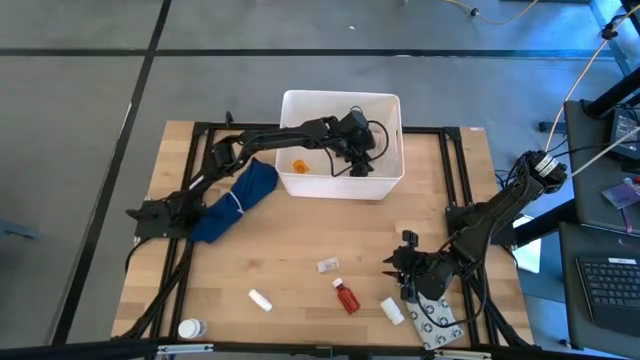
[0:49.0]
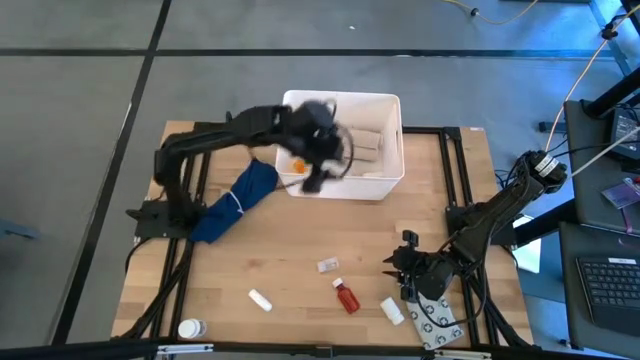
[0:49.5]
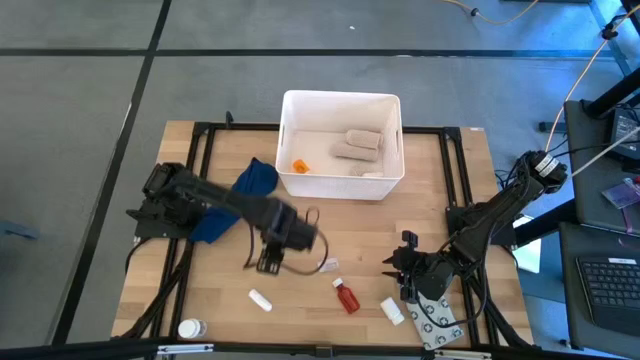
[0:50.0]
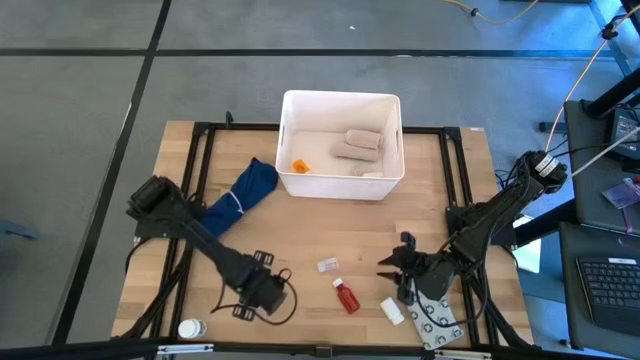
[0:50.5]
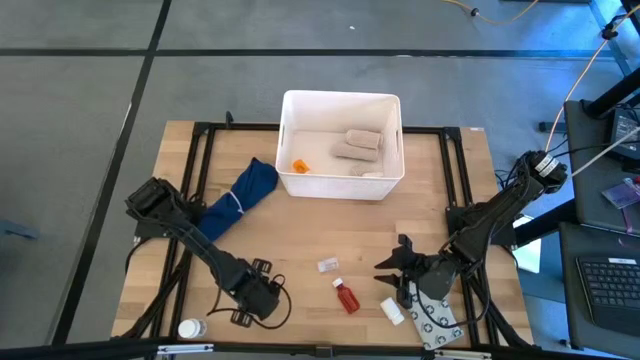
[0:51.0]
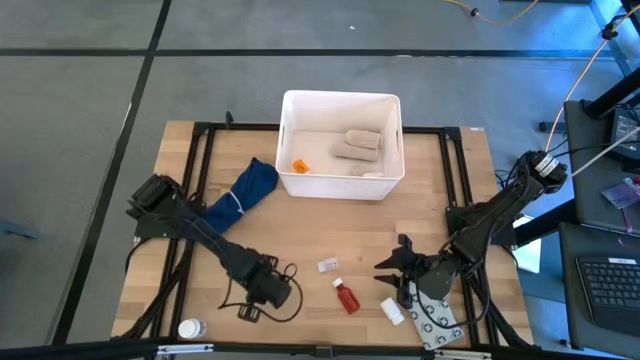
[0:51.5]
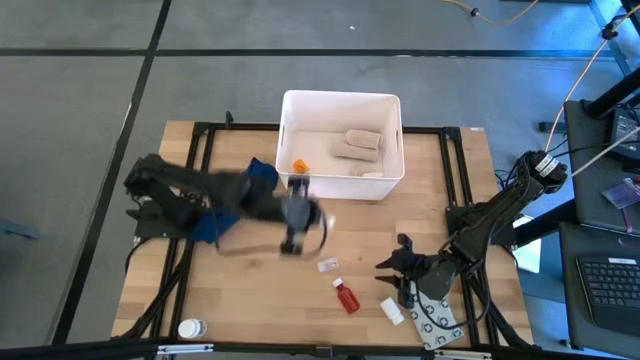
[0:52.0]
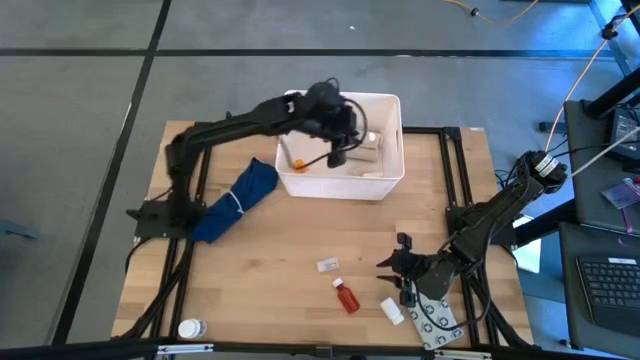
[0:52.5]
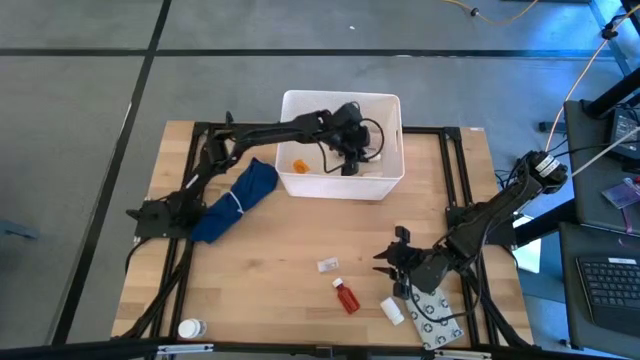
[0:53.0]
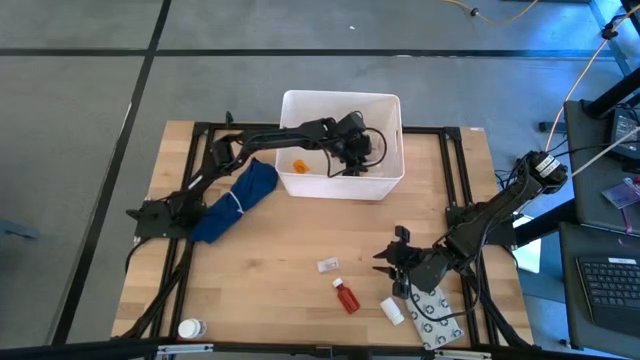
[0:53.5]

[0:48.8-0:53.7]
Task: Pick & place medical supplies in basket/bin
Put the white rolled gauze into the white bin

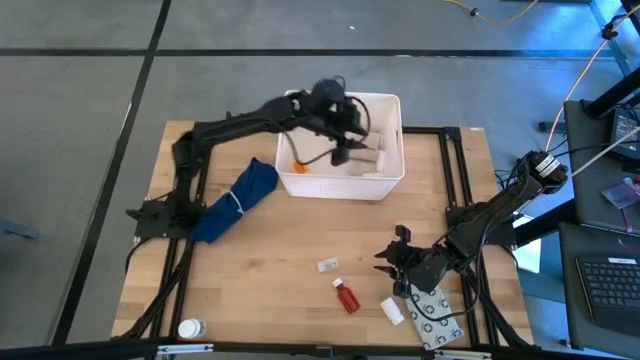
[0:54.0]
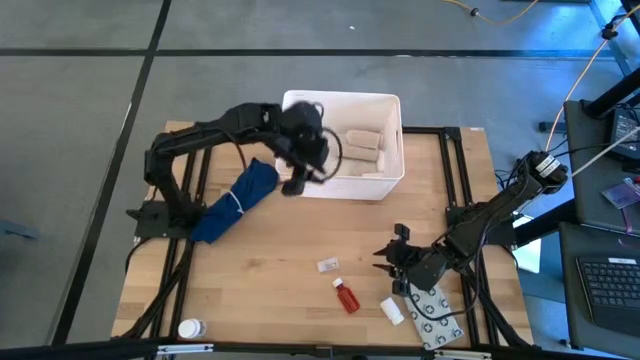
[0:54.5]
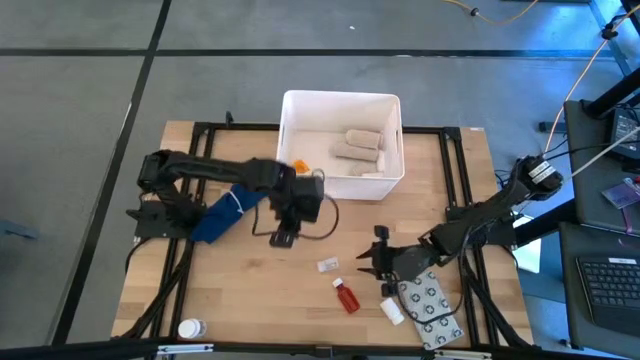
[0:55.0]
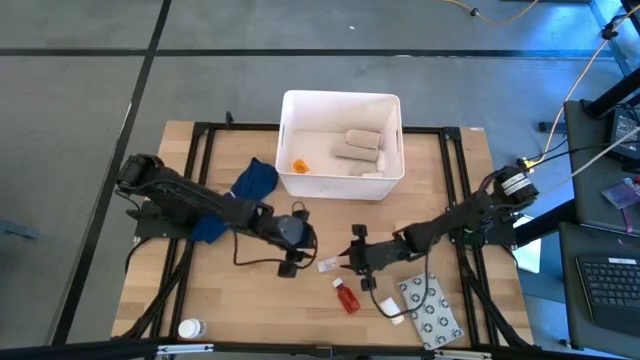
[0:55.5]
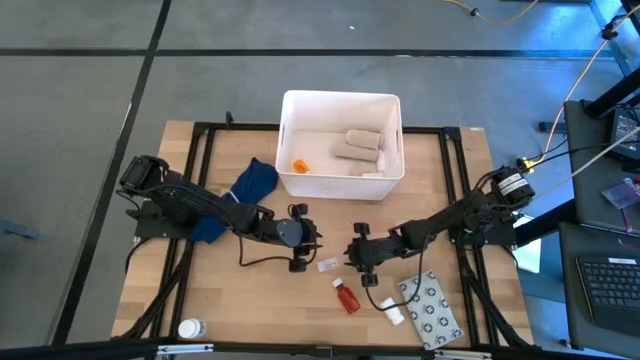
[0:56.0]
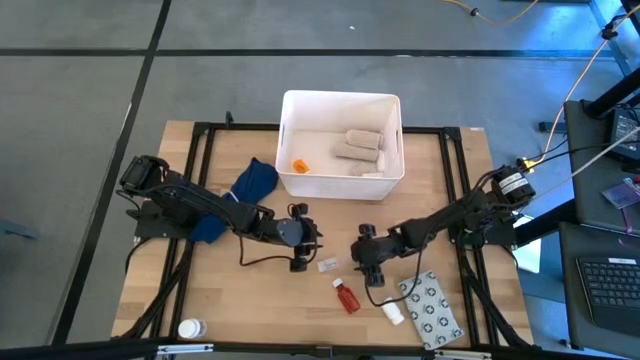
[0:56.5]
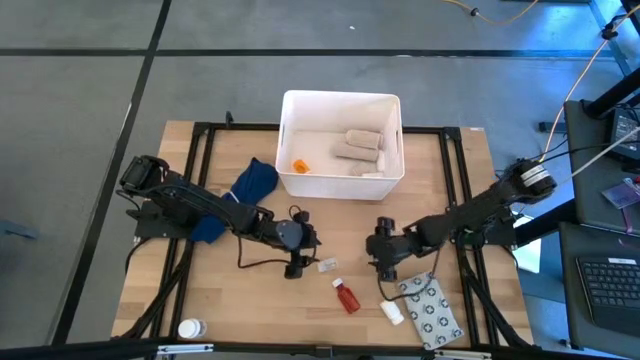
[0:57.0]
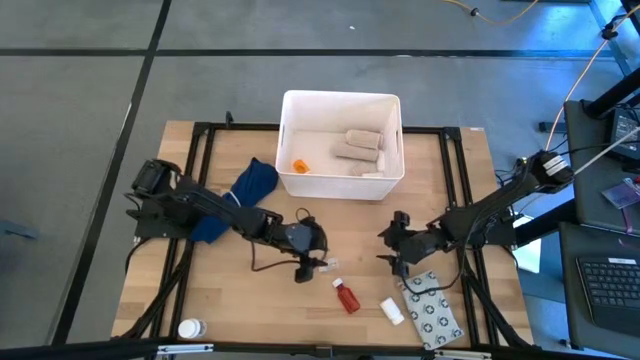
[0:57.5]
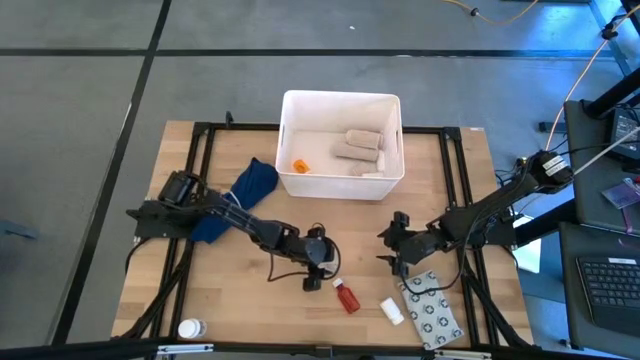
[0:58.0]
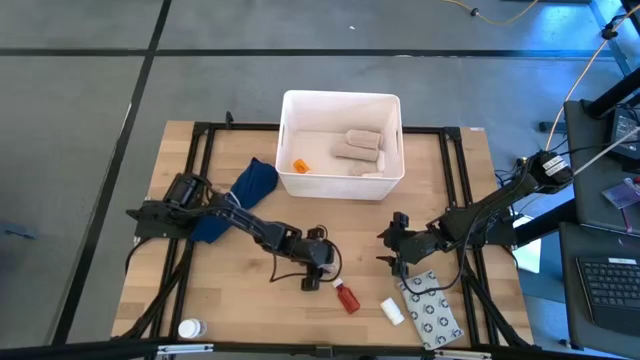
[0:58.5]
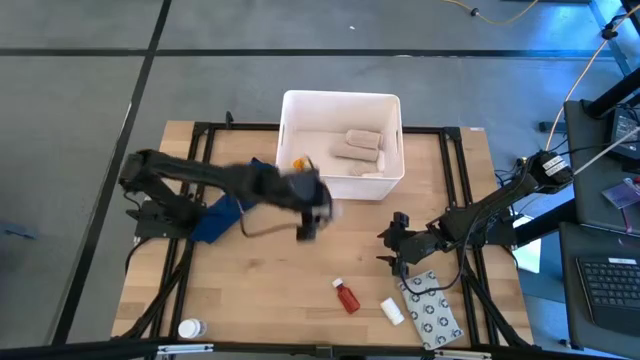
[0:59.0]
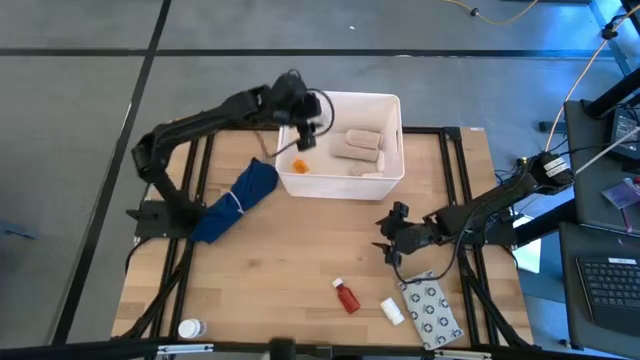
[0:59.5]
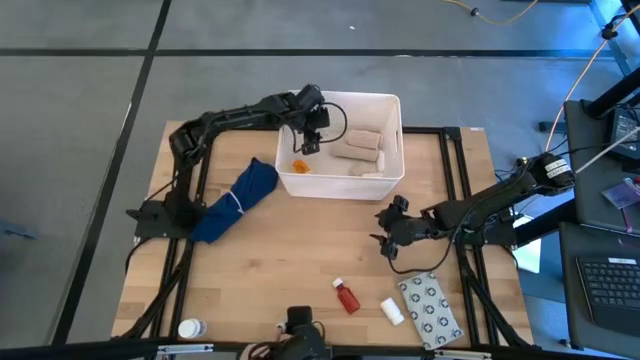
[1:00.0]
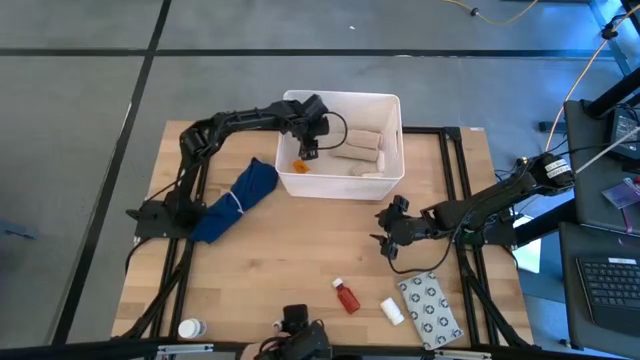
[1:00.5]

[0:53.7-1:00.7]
Put the transparent pill bottle into the white bin

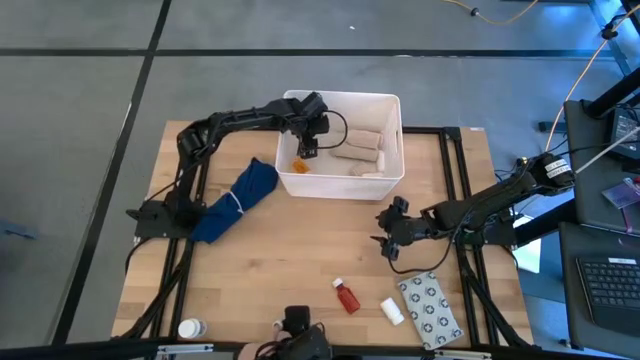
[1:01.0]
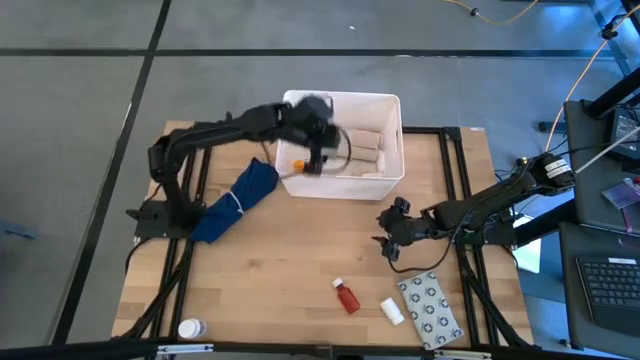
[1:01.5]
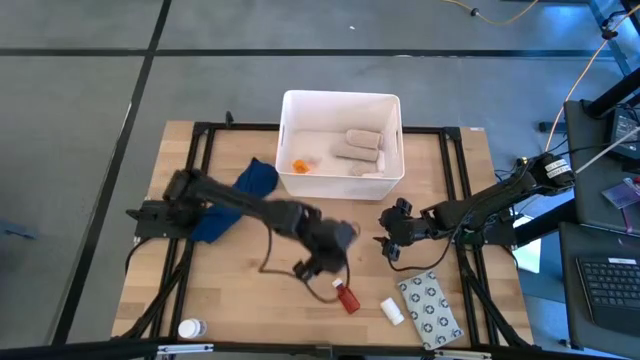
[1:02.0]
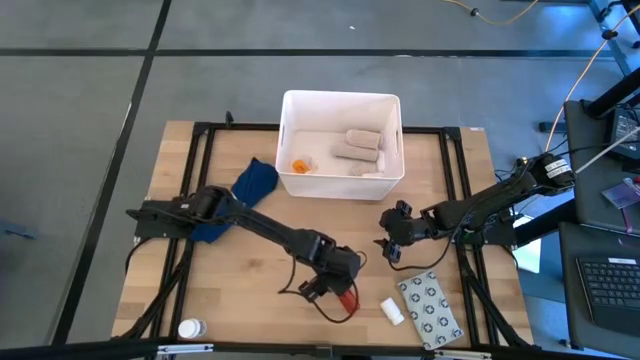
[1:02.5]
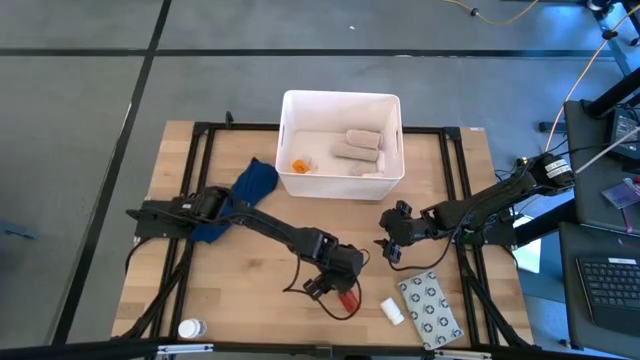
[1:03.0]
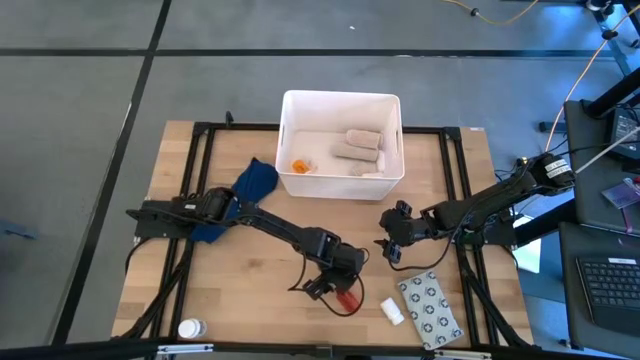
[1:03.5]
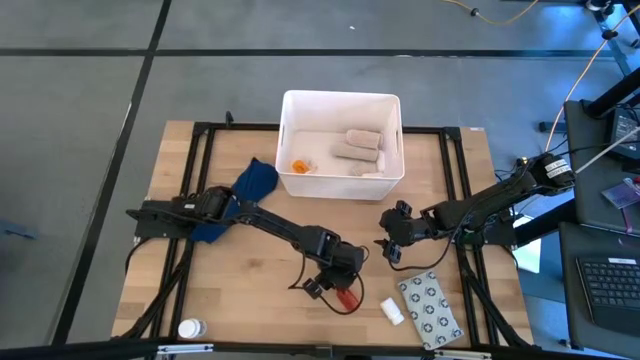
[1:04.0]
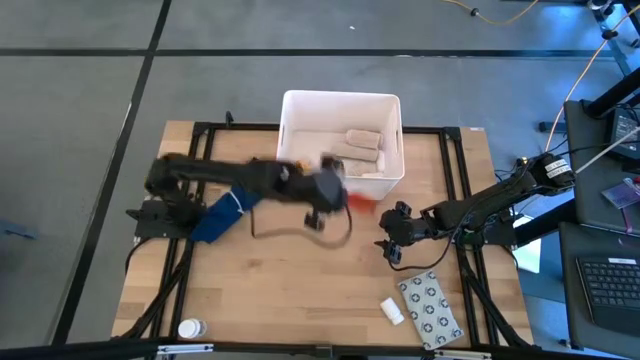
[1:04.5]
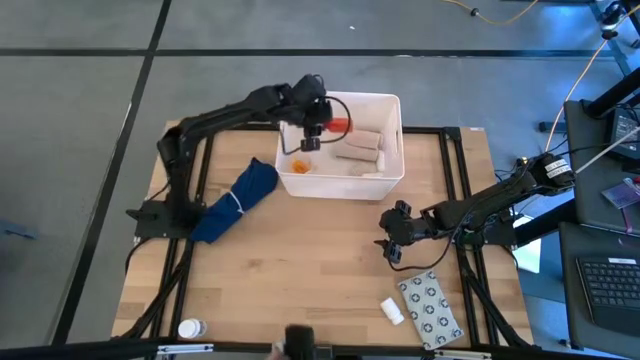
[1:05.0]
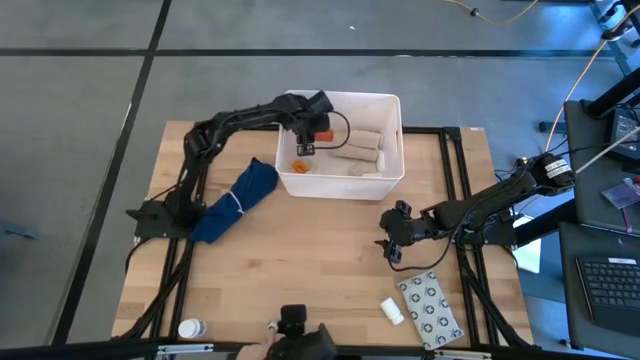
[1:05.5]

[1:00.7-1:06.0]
Put the red pill bottle into the white bin

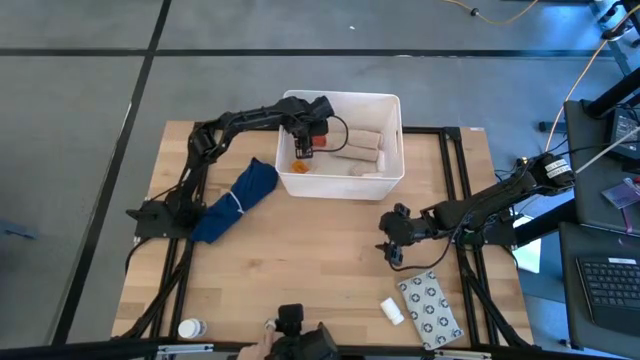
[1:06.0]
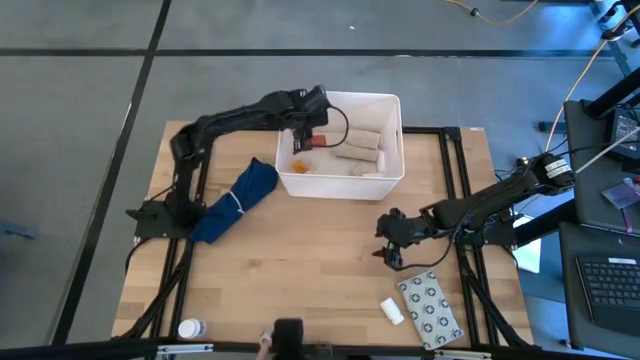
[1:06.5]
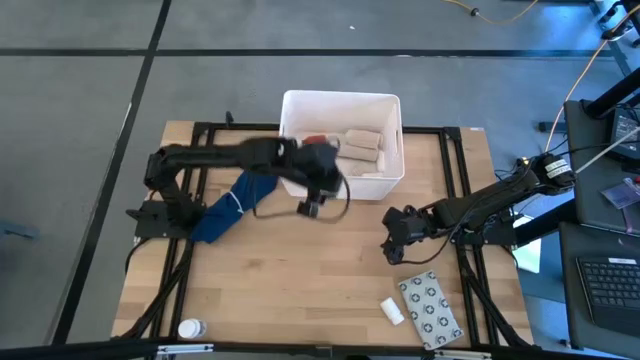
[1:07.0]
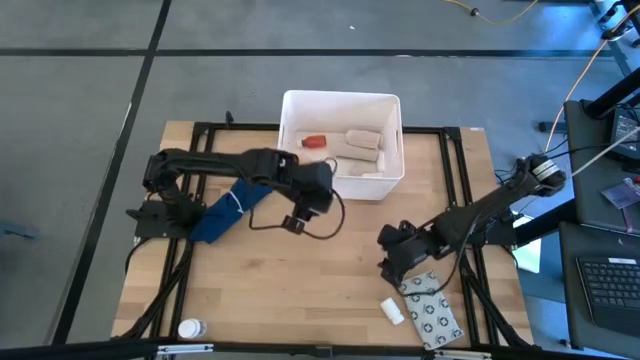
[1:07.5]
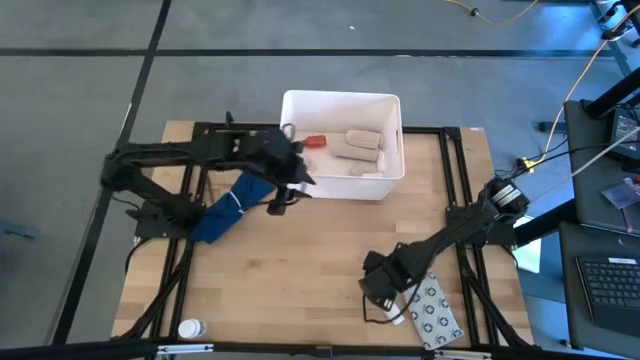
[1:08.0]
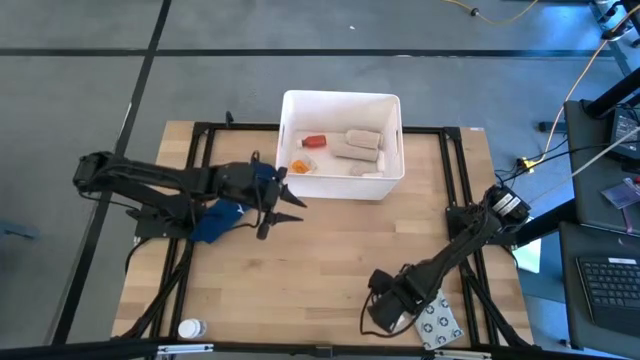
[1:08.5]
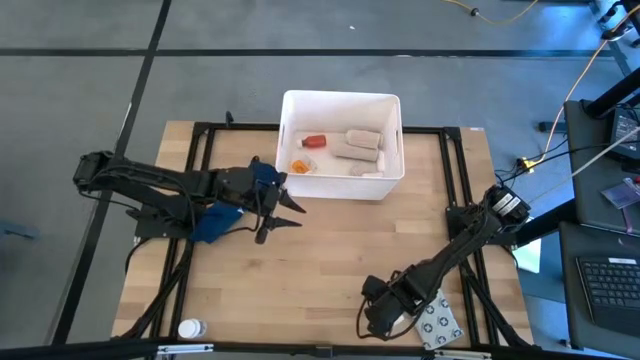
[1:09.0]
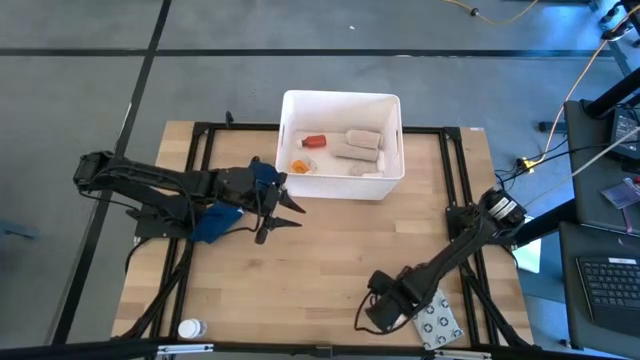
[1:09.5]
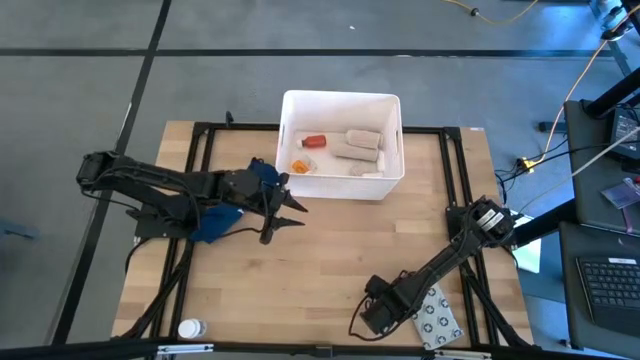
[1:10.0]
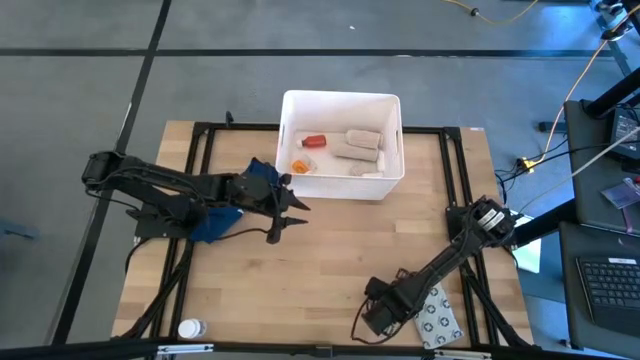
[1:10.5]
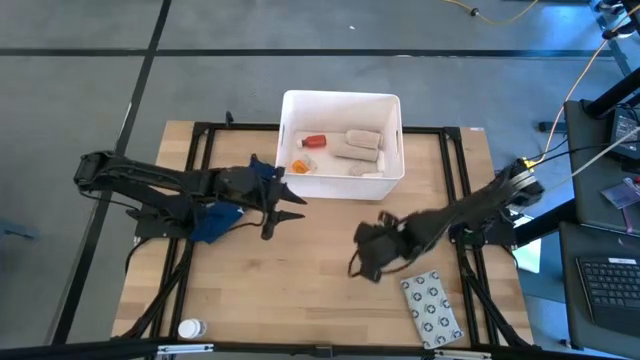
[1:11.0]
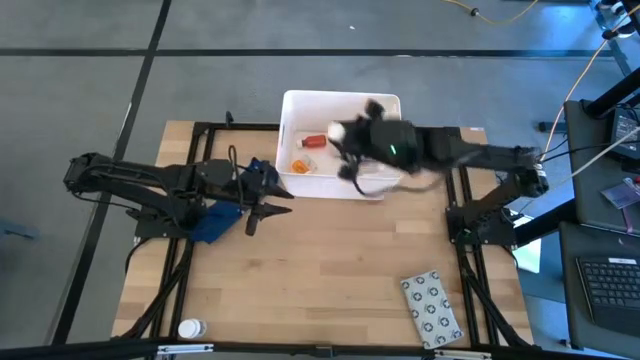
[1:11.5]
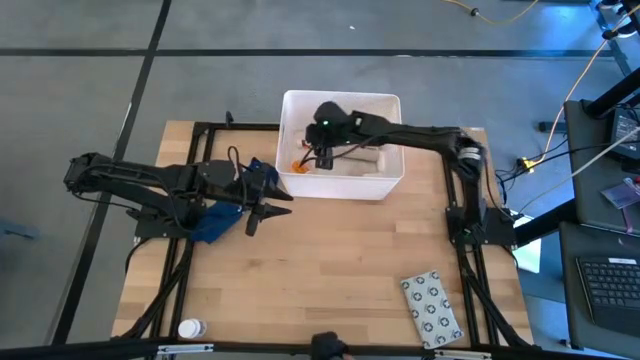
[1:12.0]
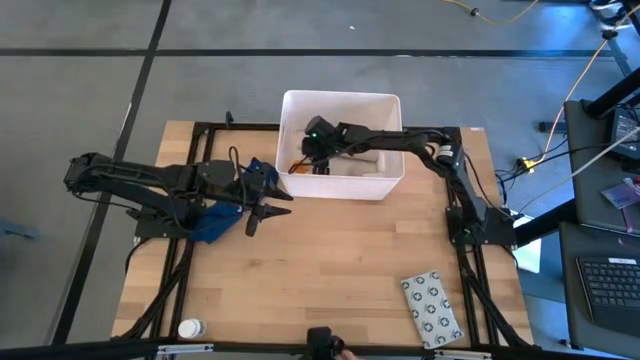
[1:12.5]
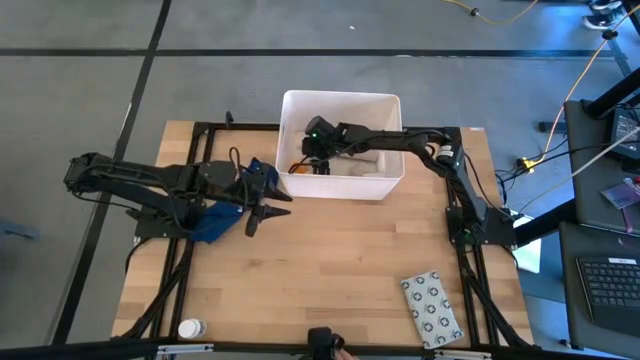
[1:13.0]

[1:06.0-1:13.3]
Put the white pill bottle into the white bin
